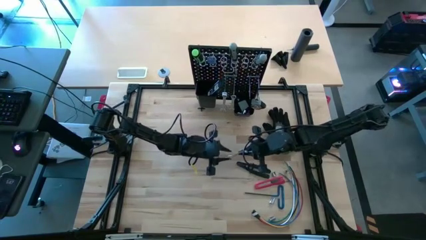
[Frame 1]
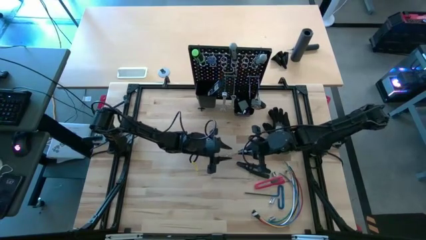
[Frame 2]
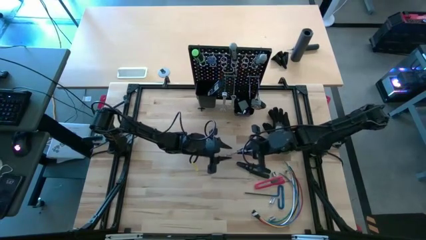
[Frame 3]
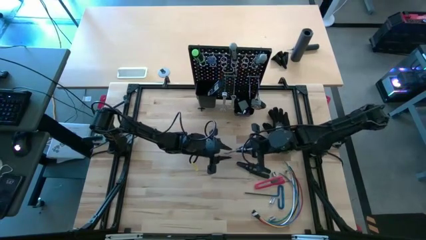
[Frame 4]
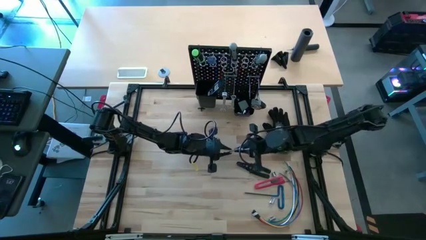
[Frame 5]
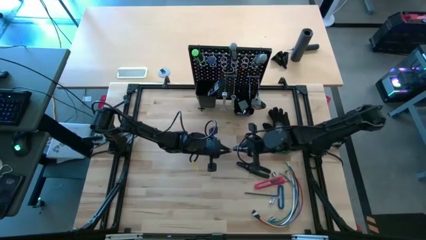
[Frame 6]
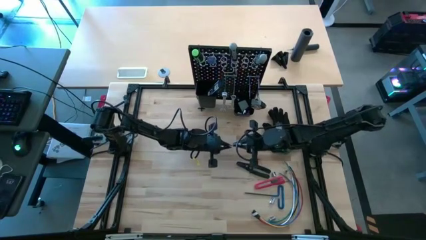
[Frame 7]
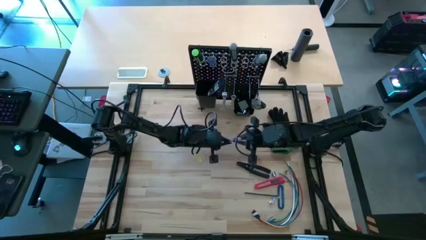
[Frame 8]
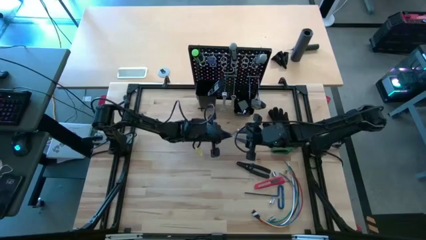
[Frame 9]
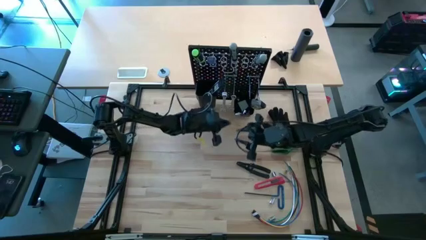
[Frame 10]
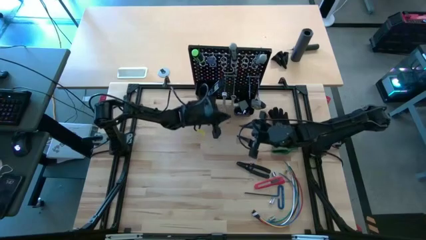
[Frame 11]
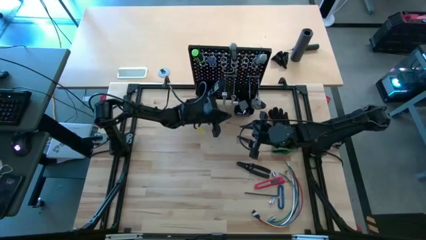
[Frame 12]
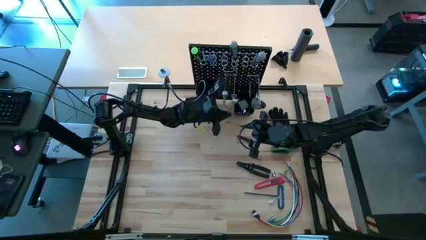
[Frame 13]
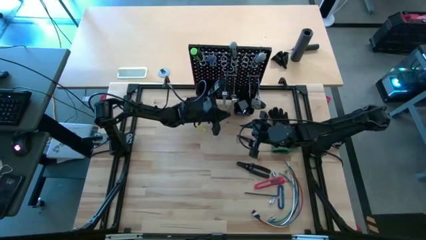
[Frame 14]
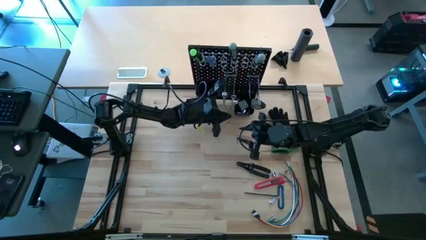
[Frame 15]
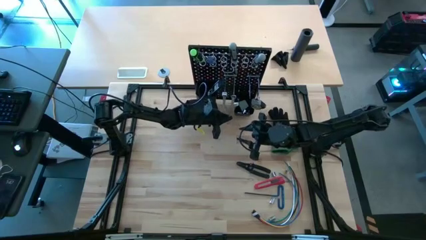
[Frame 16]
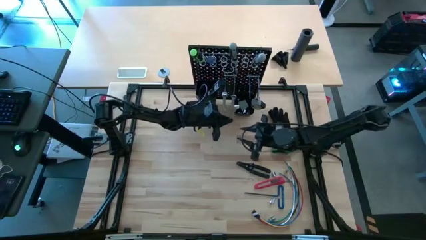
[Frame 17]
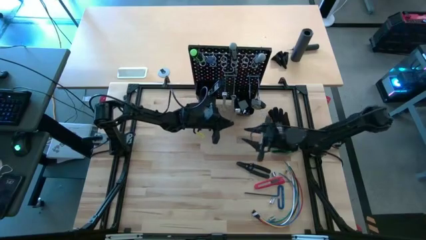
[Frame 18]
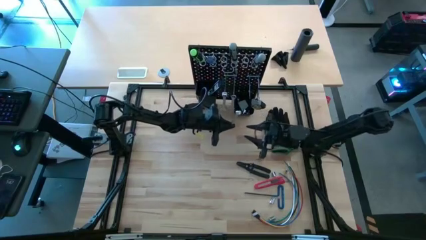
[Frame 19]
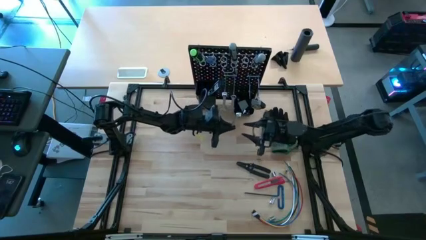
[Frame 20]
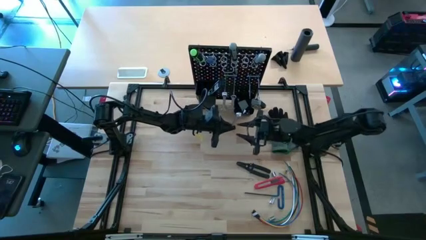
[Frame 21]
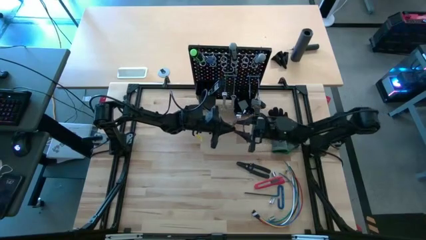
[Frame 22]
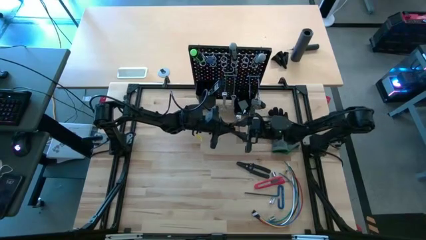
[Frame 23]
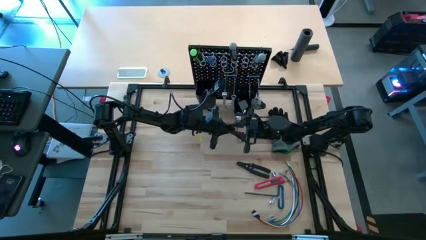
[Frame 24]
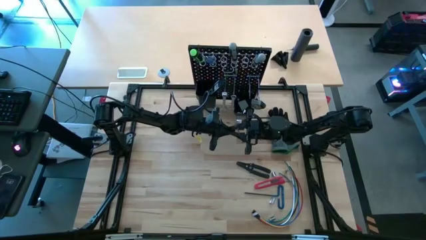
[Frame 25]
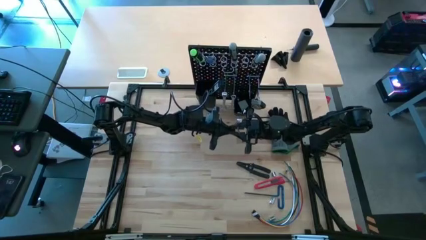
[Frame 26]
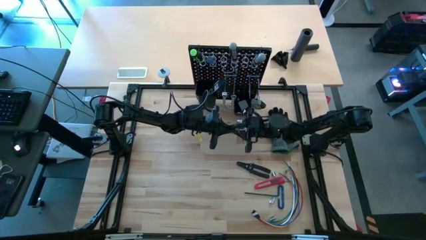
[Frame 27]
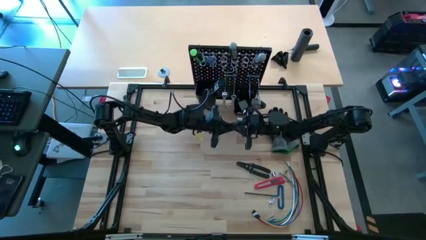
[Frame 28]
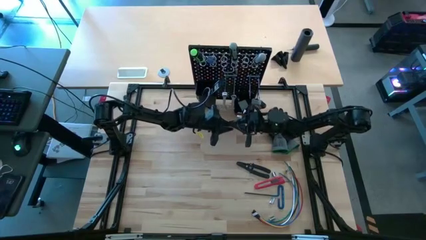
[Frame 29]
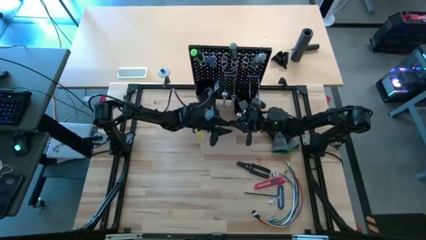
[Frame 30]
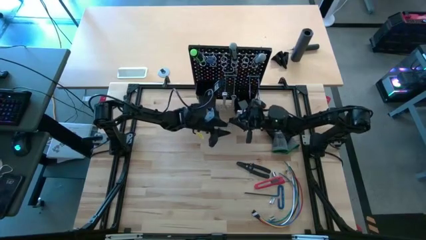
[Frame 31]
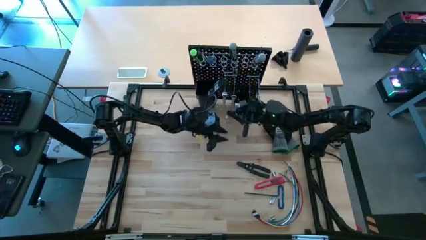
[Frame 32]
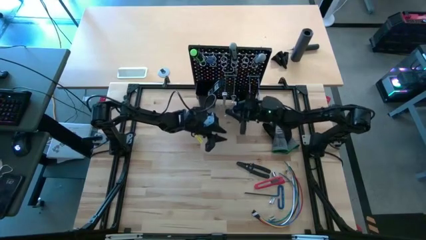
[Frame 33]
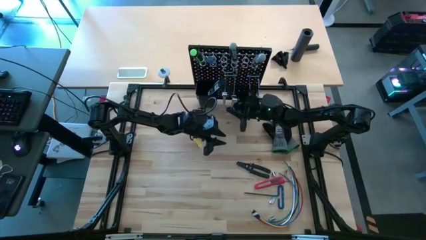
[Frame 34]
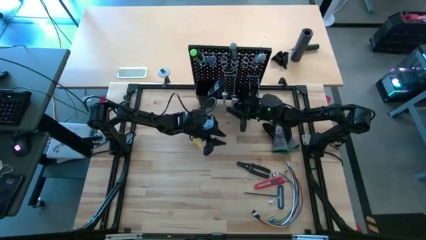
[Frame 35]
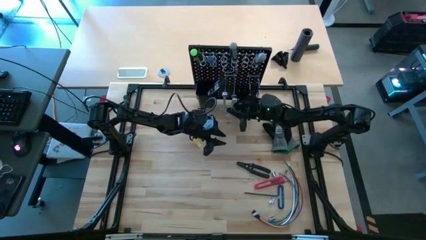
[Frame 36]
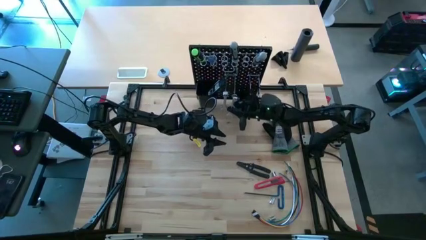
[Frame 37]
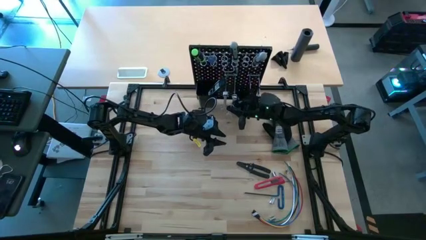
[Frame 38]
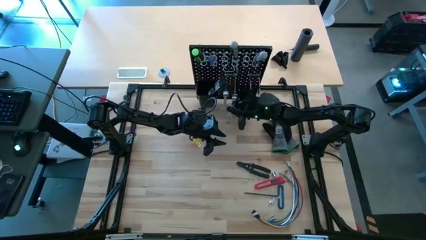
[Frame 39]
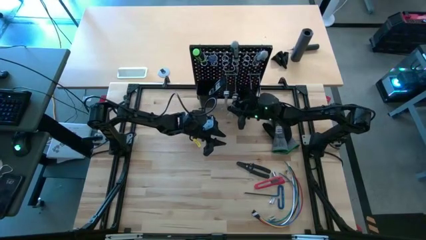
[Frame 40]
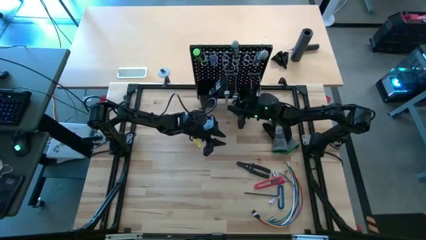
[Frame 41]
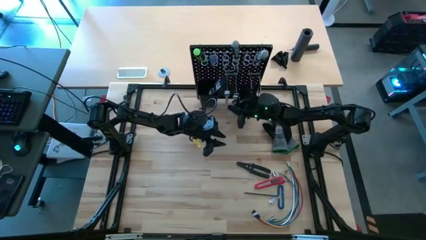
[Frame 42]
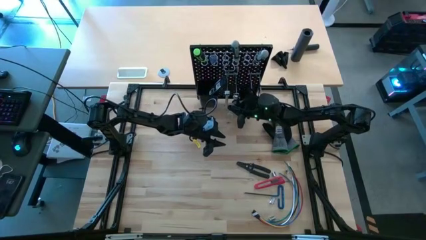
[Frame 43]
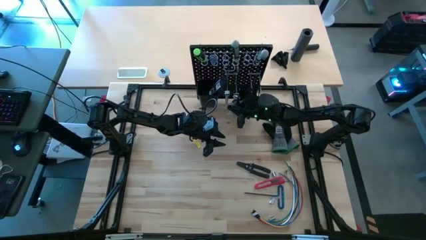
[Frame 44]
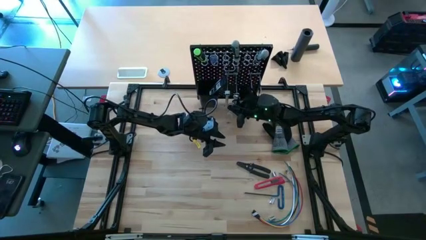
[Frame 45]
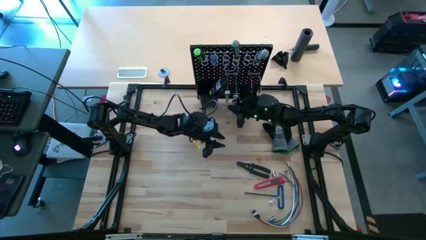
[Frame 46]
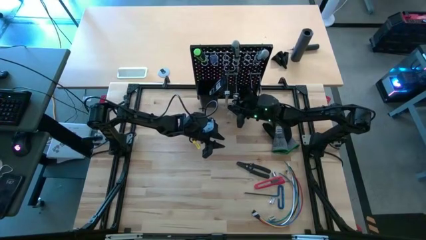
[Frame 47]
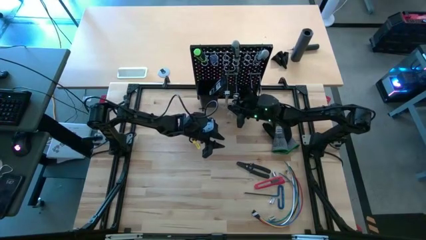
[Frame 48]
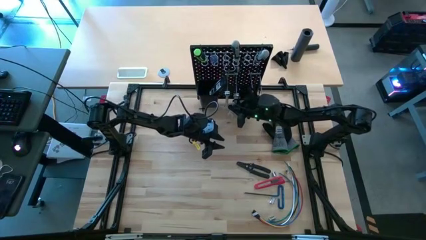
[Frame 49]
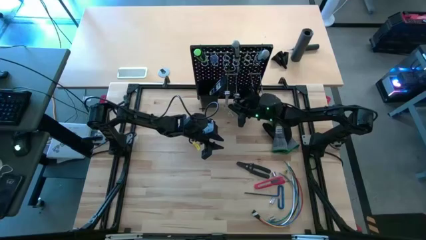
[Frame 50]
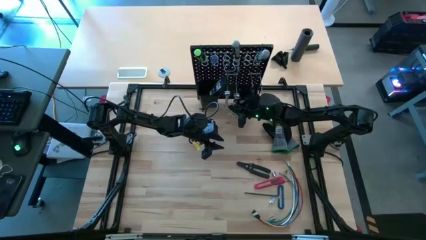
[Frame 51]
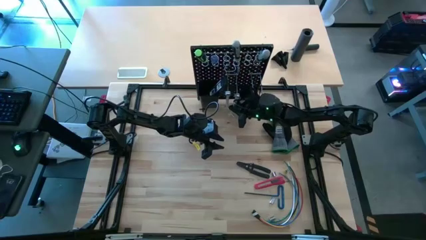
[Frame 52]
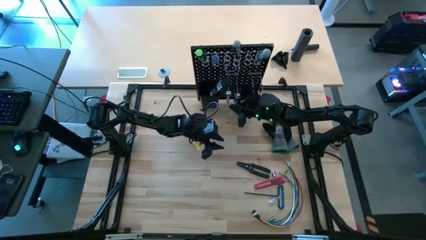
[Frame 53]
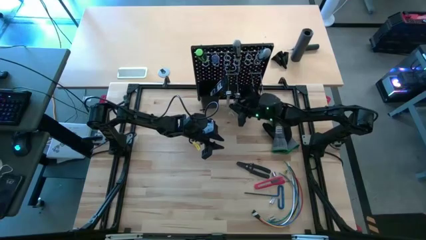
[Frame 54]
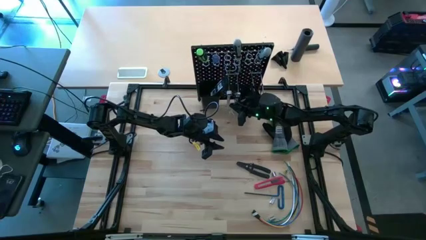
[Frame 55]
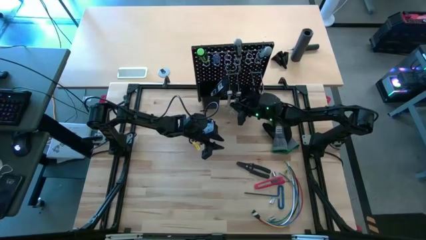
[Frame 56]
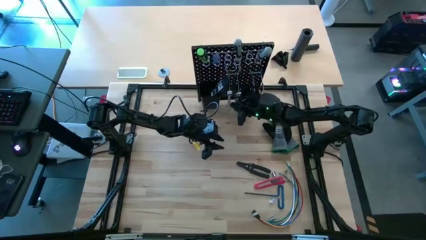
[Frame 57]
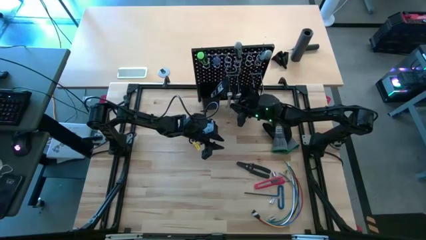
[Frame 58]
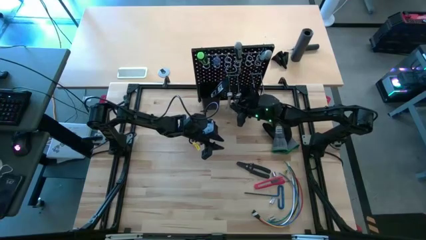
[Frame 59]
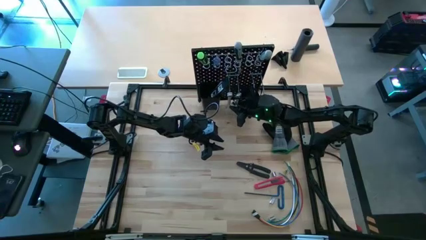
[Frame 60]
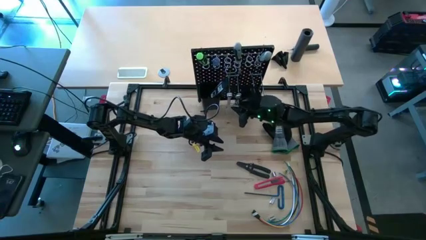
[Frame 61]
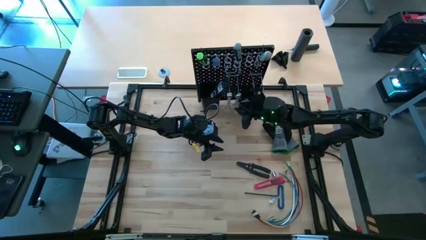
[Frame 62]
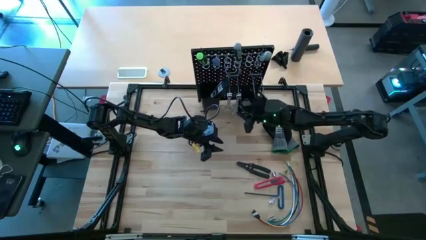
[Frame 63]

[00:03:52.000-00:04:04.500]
Task: Hang tools onto peg board
Hang the silver wrench on the peg board
